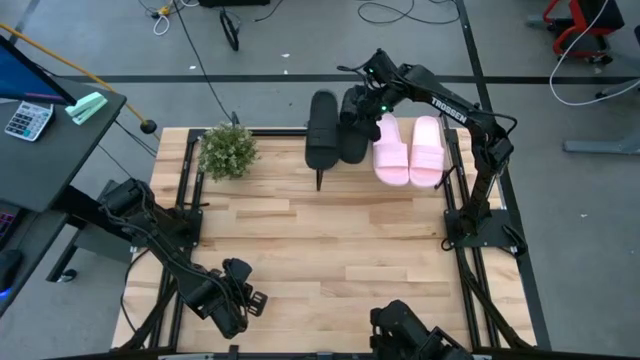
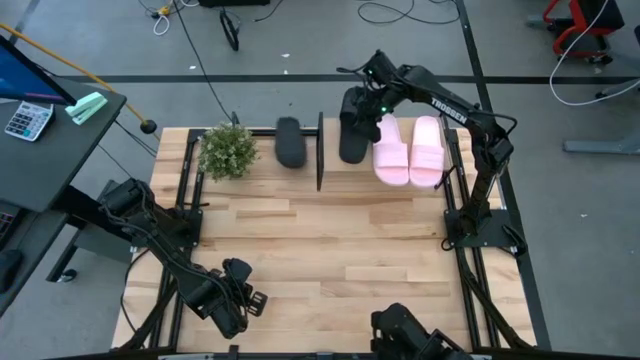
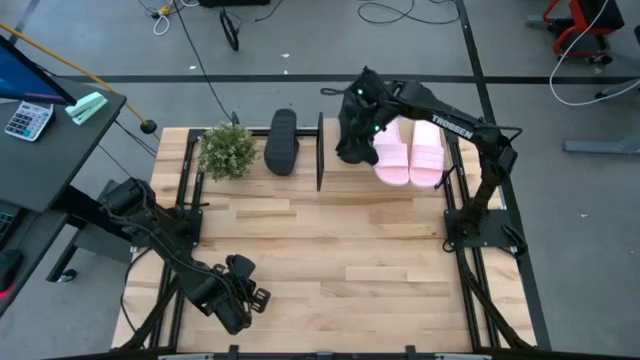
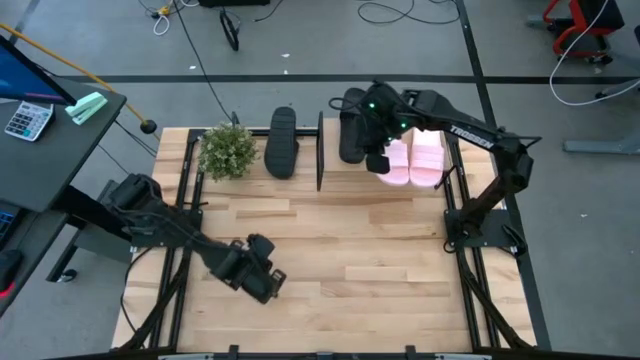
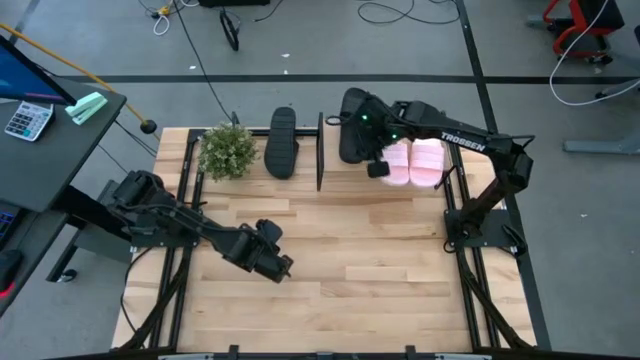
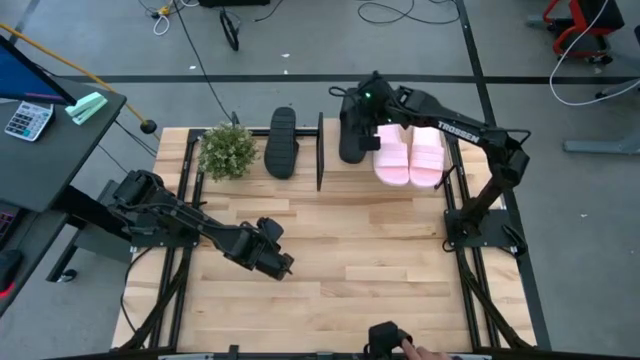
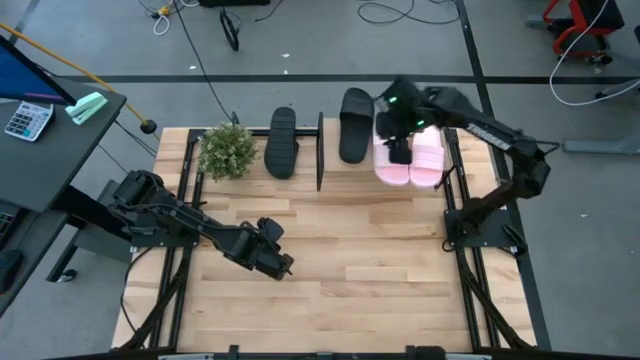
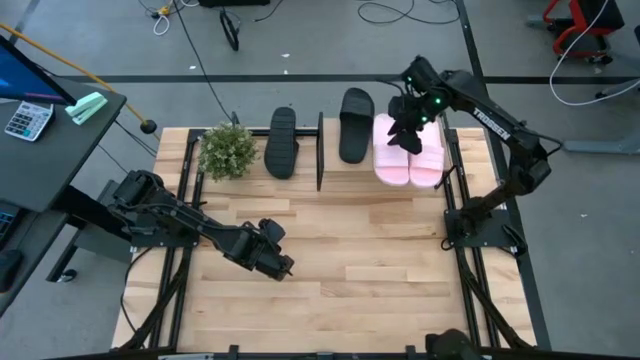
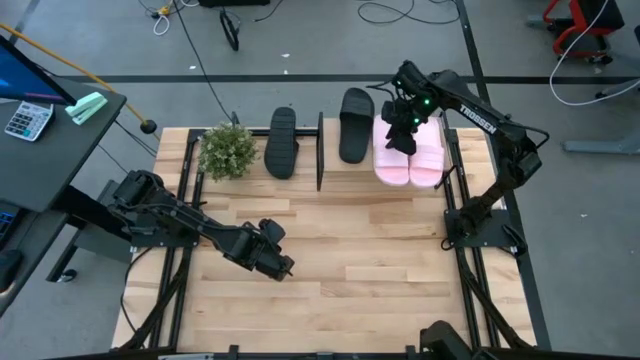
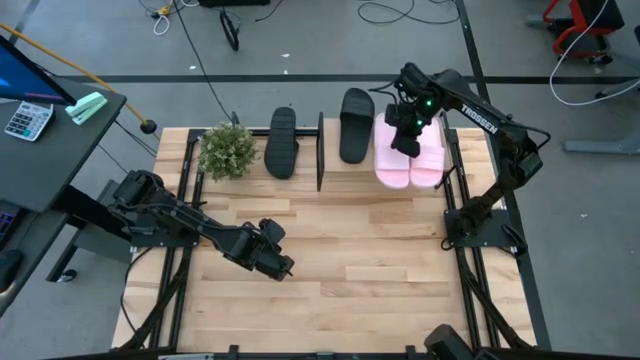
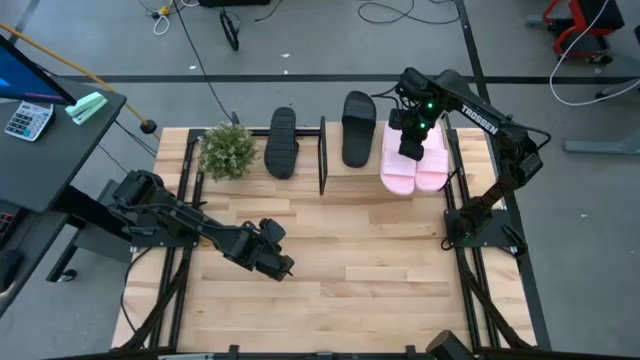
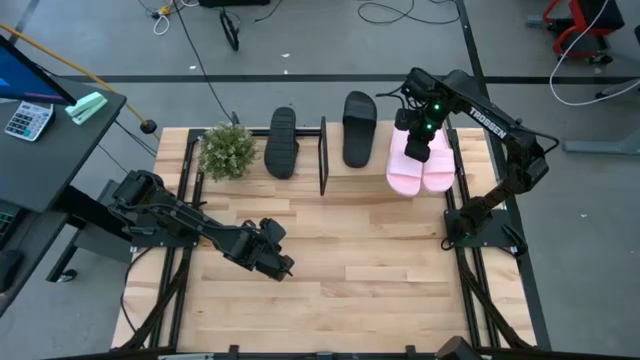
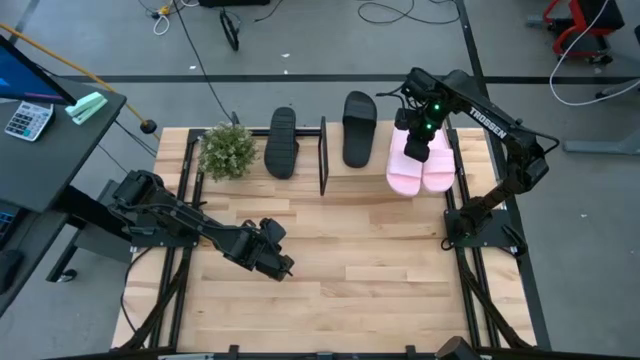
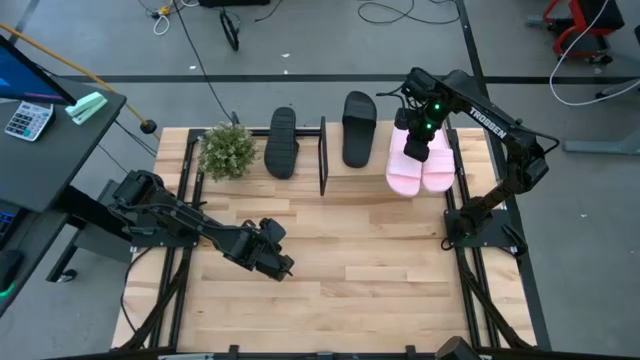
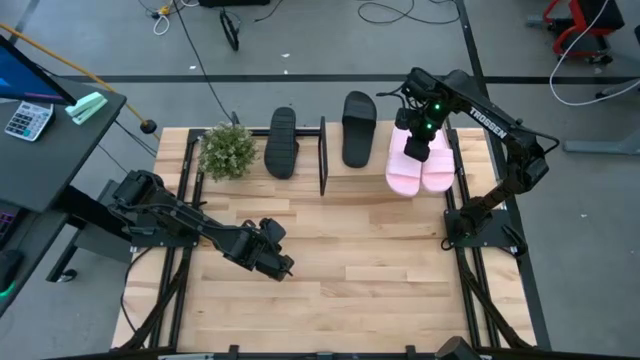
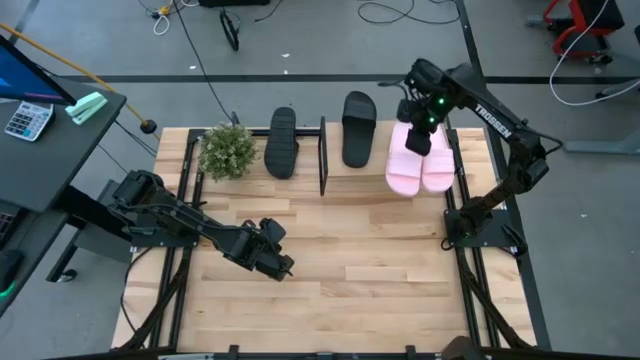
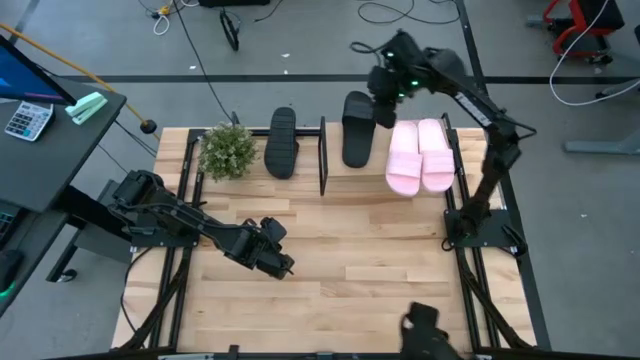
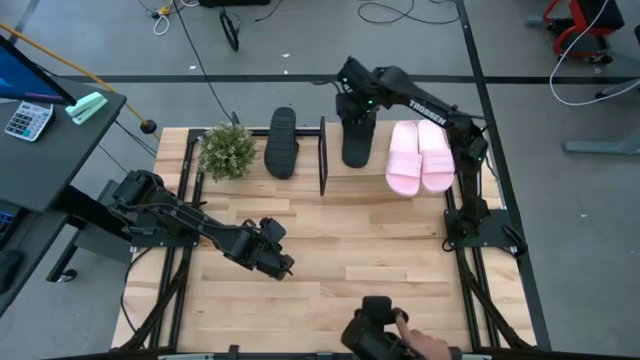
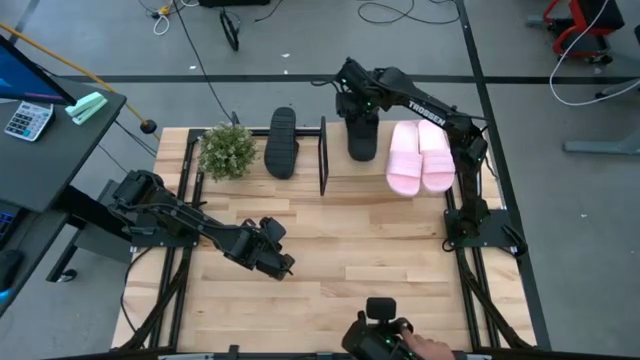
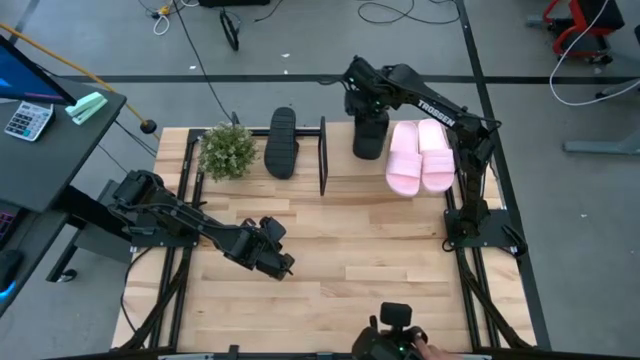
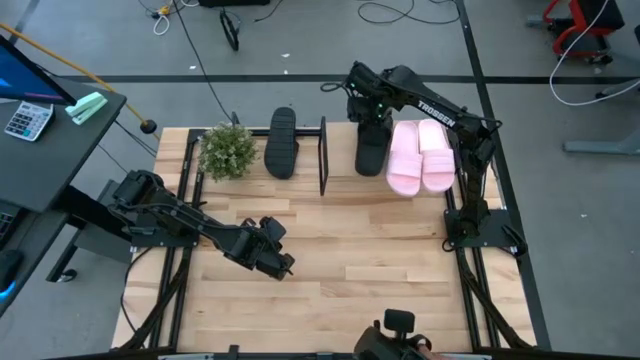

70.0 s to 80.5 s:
Task: Pick and place slides into the shelf
Adjust the slippers

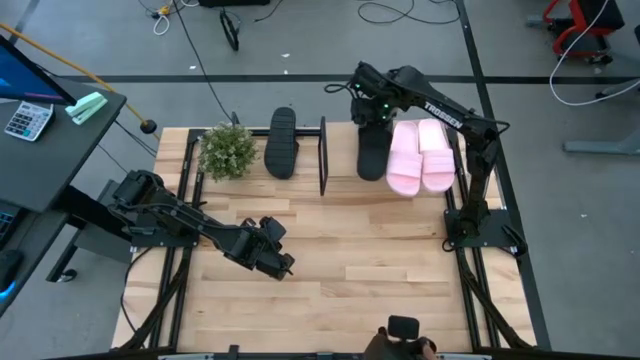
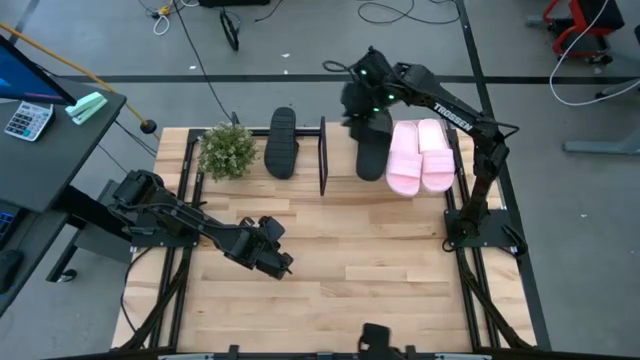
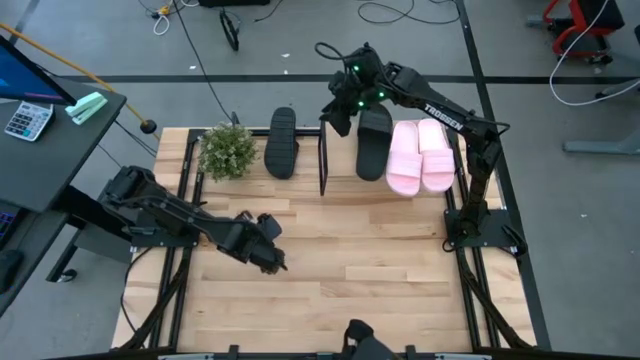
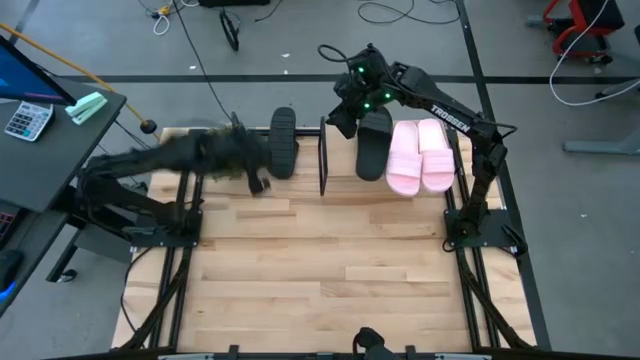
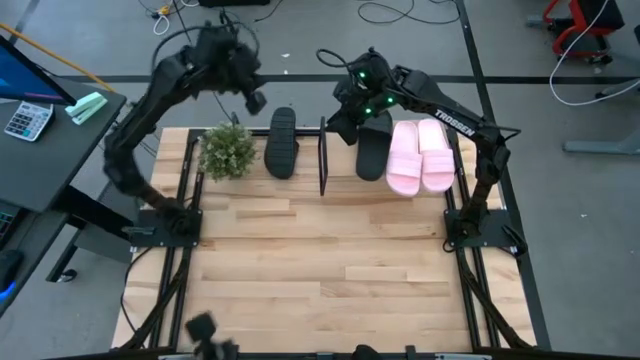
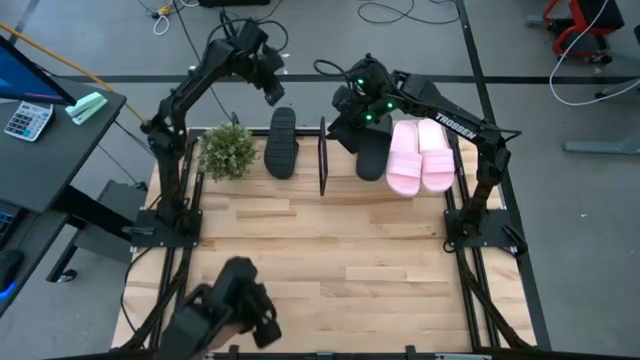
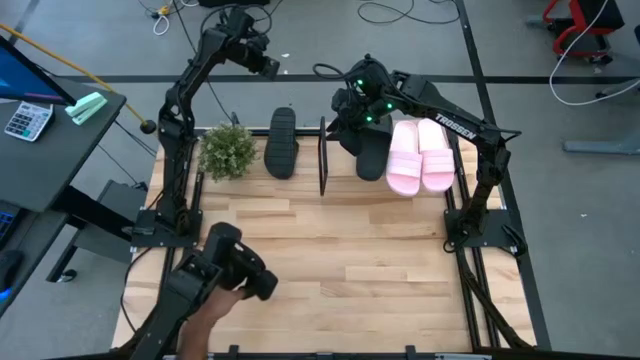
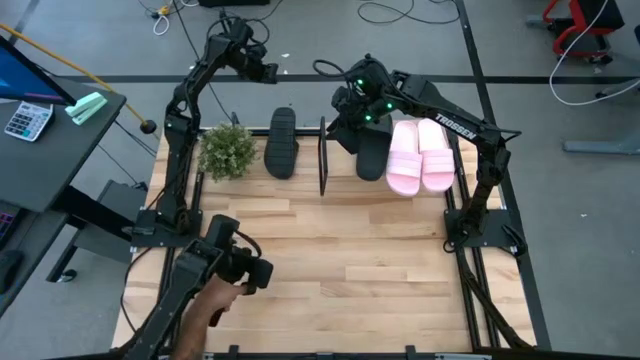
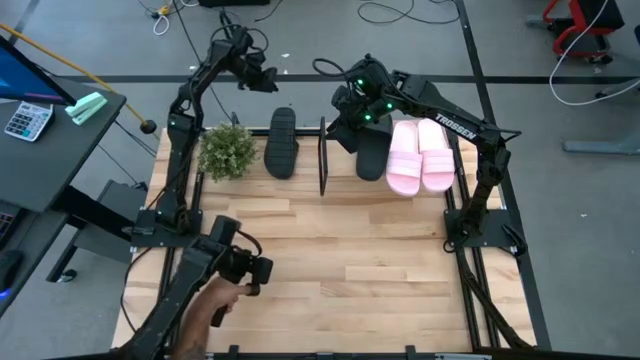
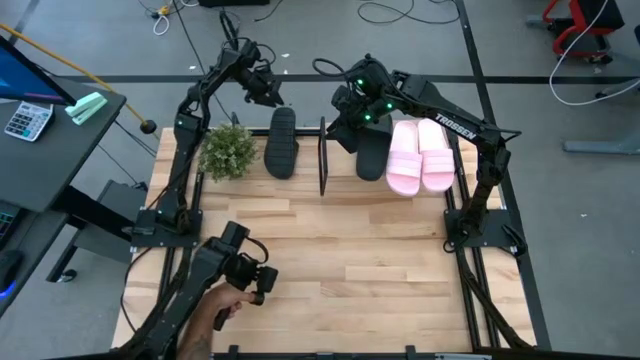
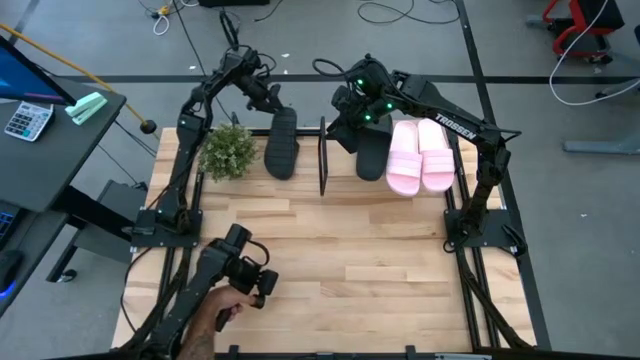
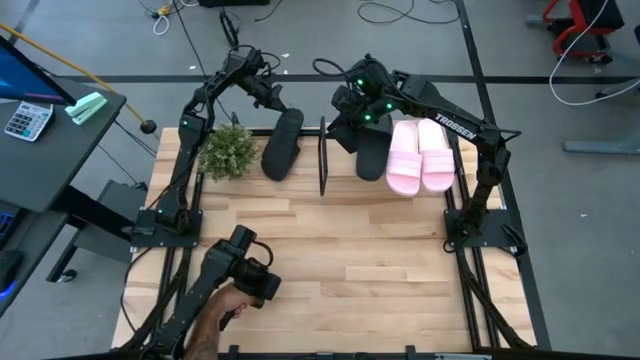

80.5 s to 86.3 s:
Put the black slipper on the shelf
